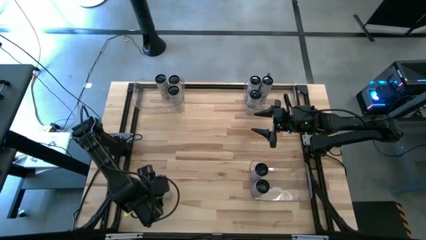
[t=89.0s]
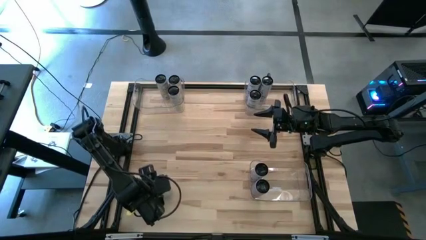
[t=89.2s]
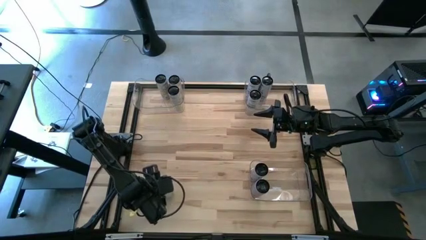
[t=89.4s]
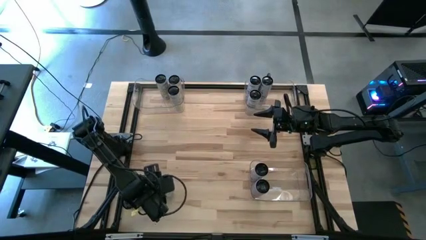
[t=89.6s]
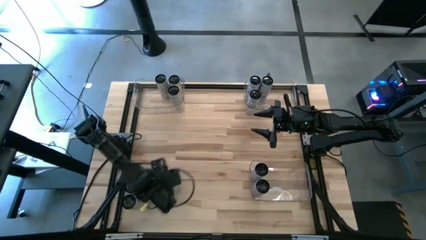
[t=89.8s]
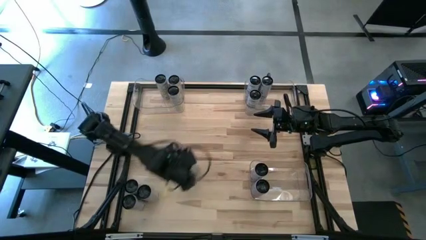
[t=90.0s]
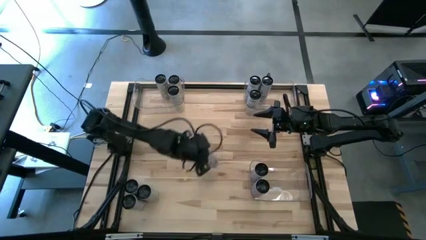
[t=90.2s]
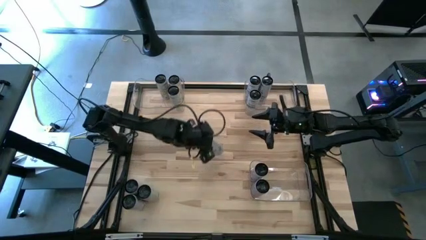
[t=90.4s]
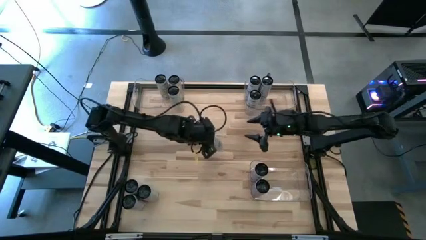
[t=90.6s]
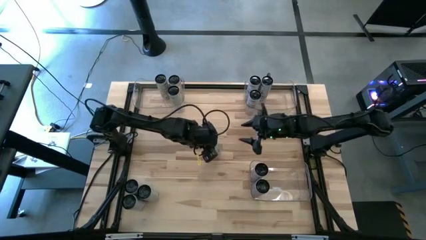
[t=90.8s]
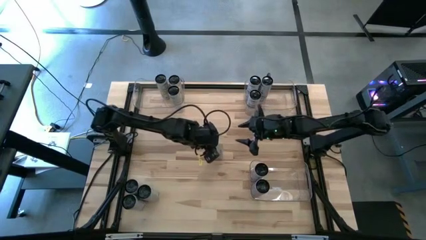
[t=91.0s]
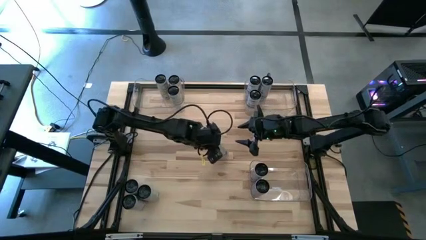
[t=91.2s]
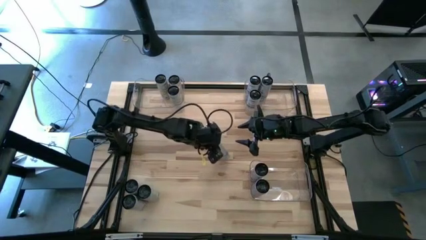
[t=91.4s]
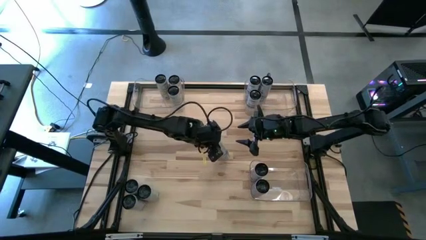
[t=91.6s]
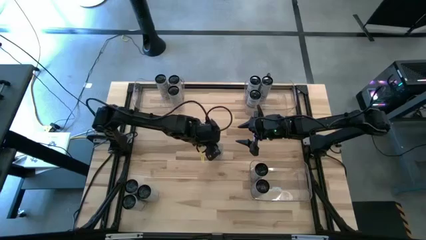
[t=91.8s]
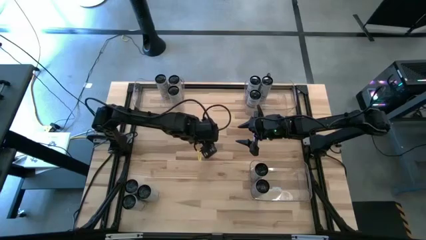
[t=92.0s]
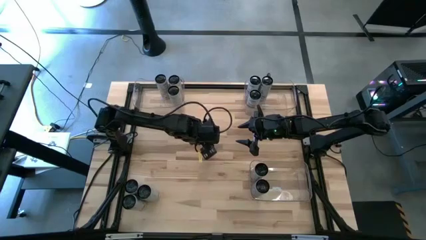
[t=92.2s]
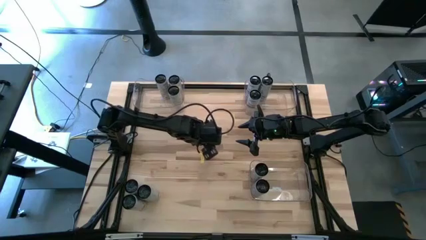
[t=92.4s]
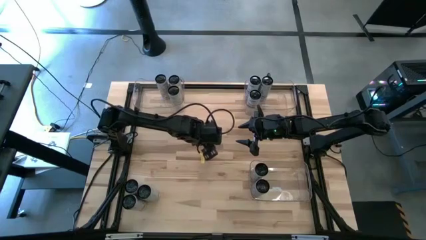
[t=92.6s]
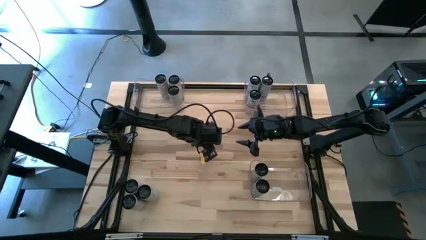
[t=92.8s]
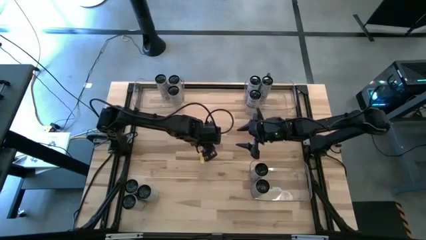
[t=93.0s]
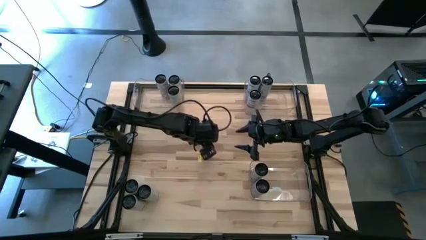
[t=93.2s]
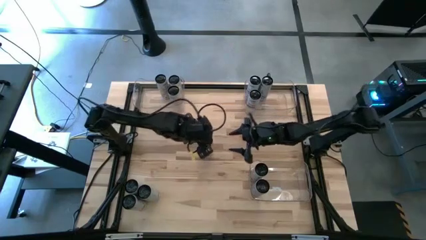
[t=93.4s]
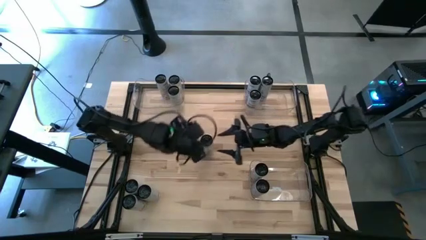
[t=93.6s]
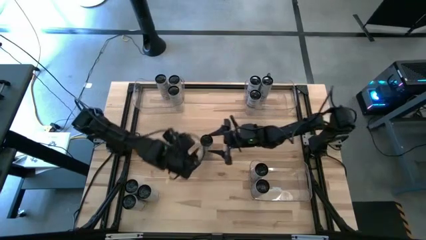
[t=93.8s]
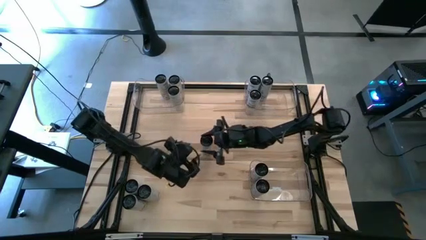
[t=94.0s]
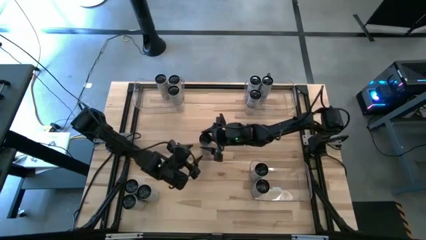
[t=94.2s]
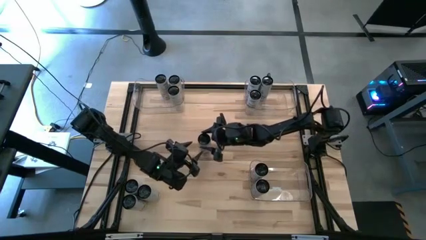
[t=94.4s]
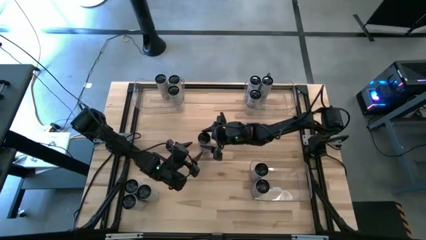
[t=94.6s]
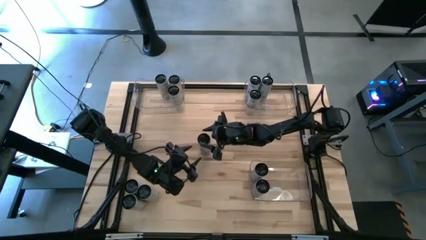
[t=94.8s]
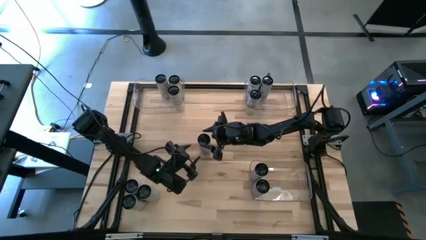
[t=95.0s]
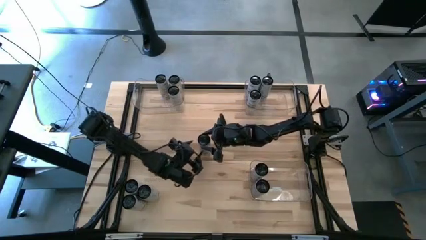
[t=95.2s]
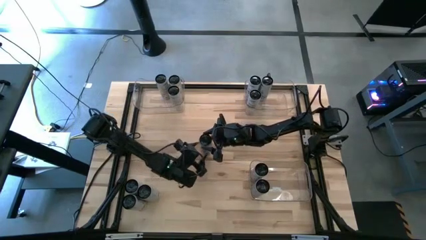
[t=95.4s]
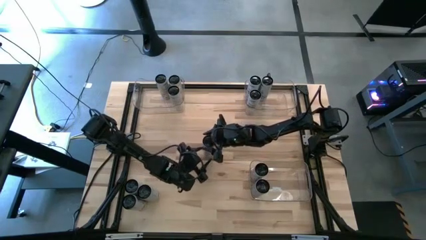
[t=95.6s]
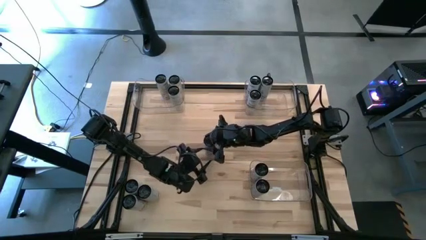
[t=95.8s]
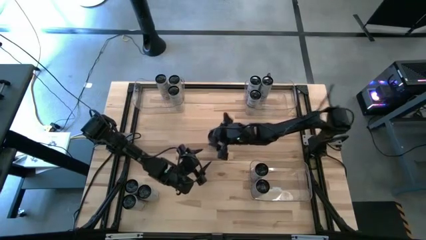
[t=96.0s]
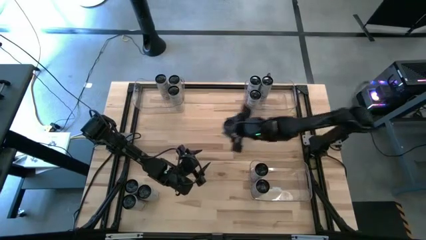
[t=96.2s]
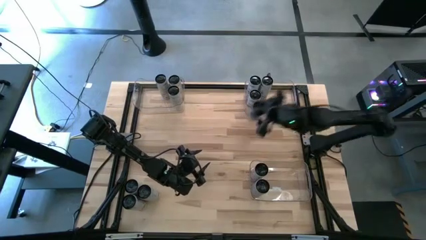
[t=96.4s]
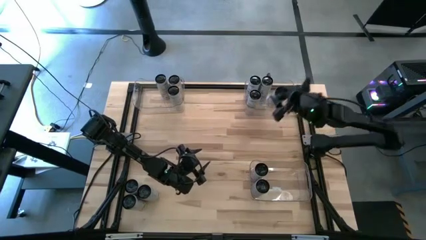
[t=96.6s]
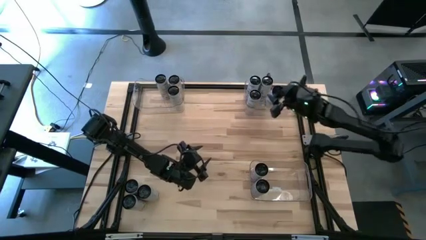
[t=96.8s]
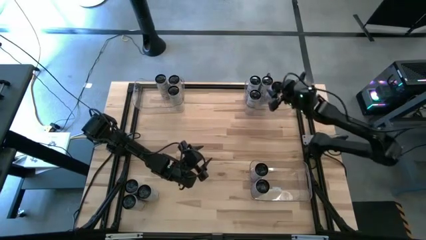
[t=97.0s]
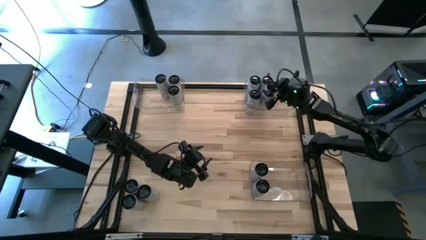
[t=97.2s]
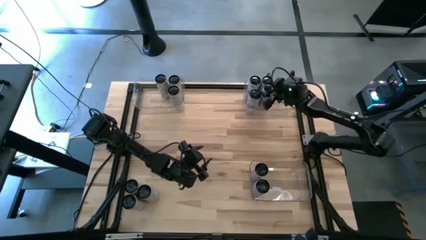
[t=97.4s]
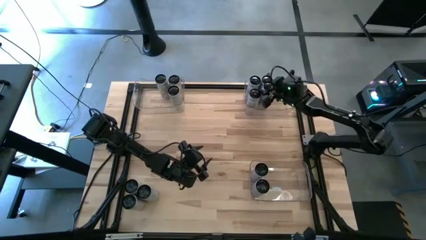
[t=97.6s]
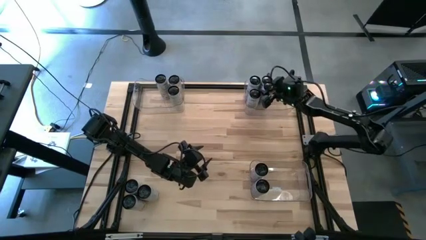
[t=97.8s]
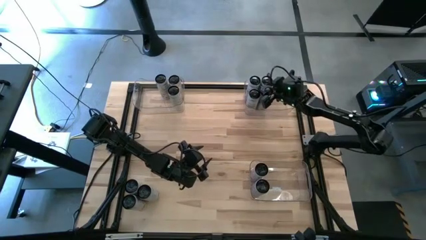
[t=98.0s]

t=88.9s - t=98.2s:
Task: Sort soda cans
Put the white-blue soda can into the top right transparent bin

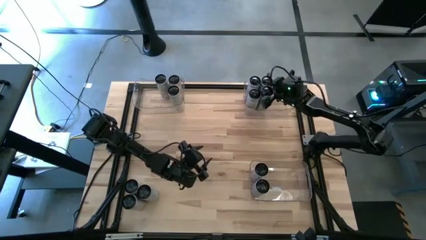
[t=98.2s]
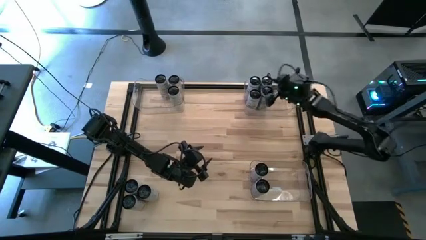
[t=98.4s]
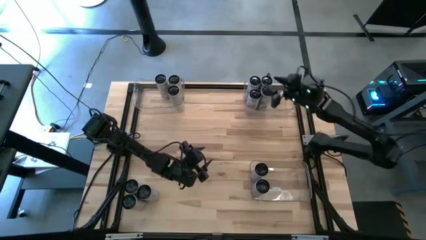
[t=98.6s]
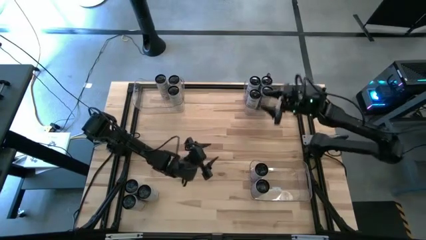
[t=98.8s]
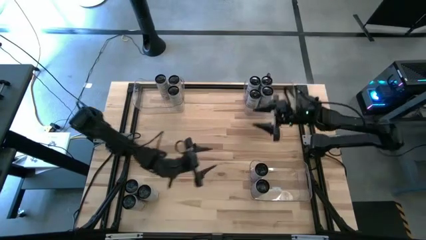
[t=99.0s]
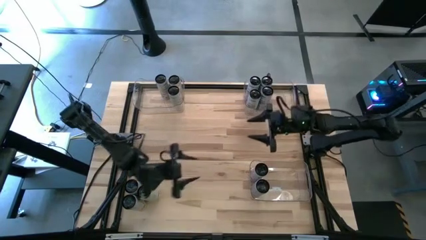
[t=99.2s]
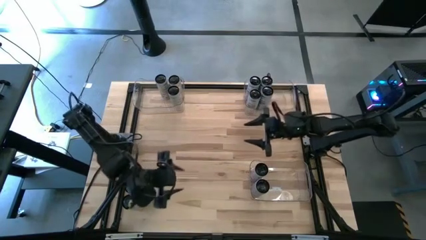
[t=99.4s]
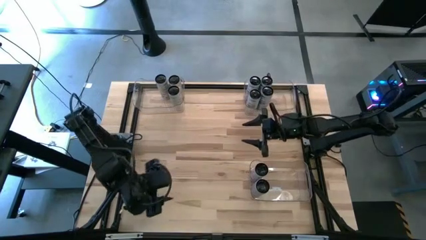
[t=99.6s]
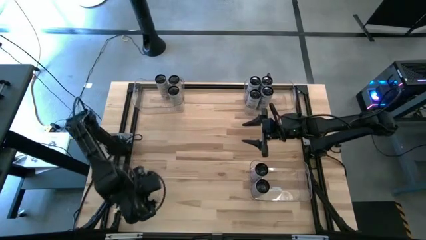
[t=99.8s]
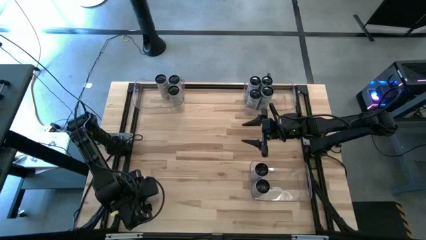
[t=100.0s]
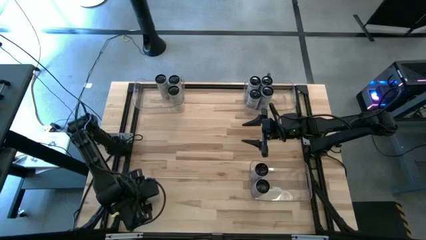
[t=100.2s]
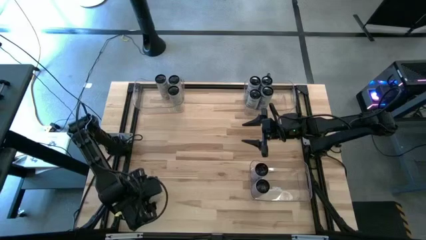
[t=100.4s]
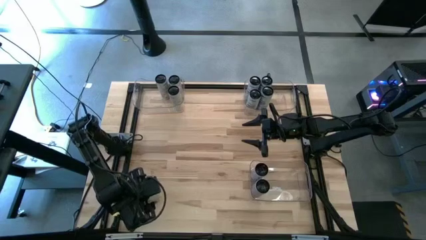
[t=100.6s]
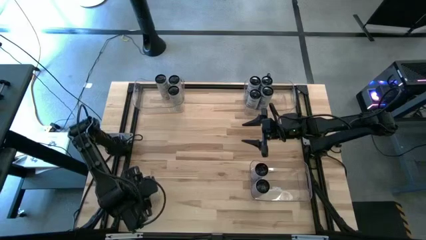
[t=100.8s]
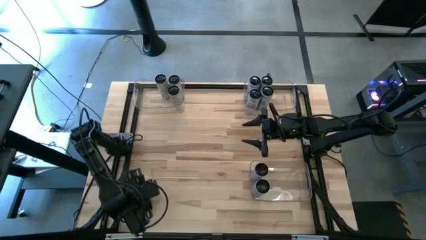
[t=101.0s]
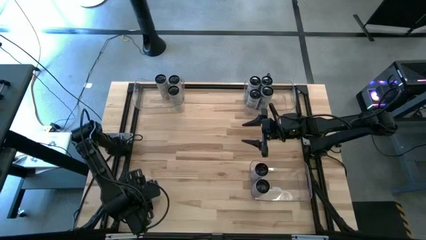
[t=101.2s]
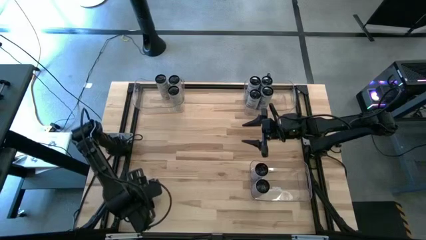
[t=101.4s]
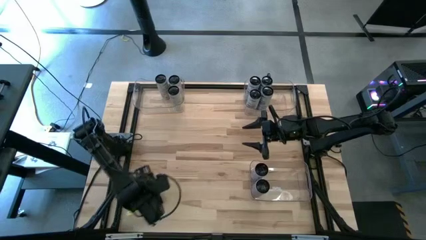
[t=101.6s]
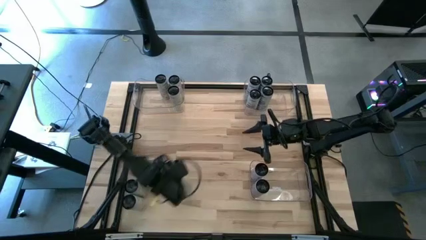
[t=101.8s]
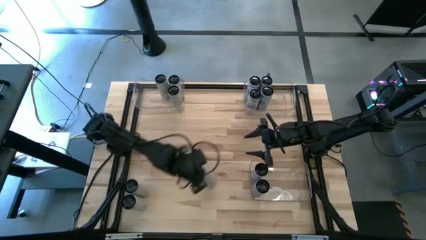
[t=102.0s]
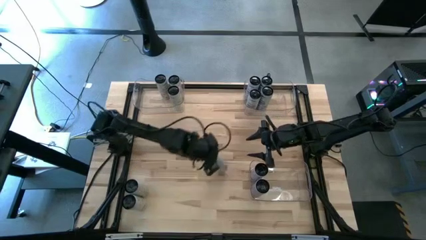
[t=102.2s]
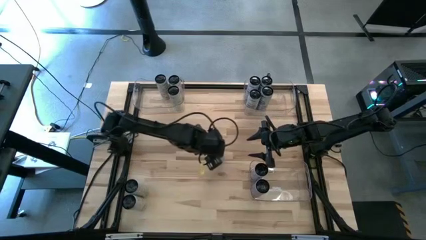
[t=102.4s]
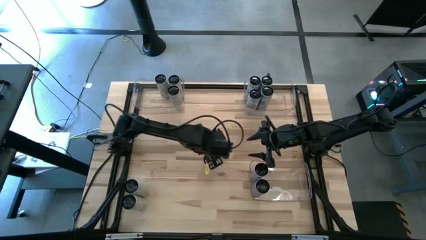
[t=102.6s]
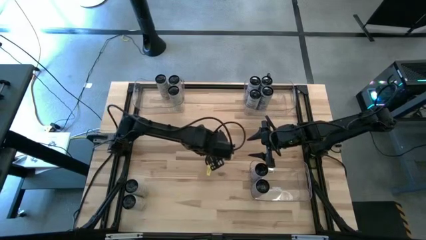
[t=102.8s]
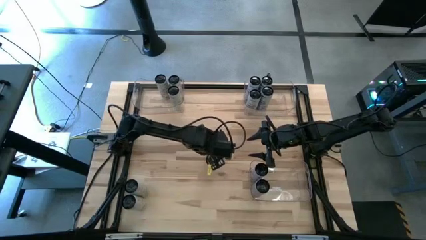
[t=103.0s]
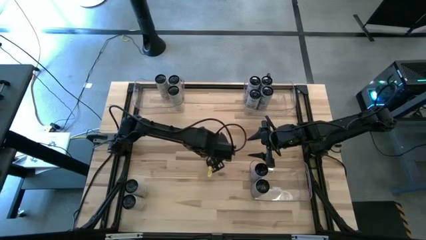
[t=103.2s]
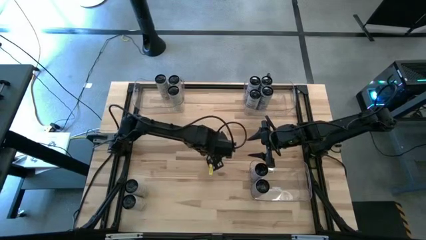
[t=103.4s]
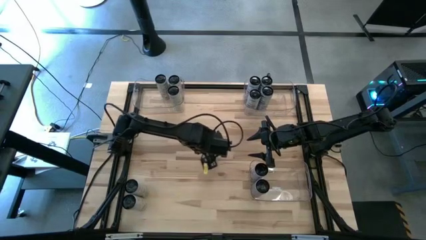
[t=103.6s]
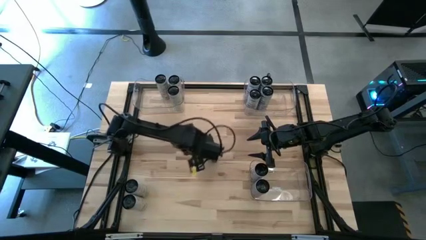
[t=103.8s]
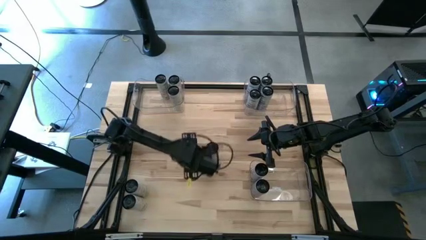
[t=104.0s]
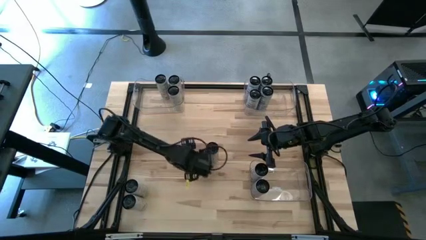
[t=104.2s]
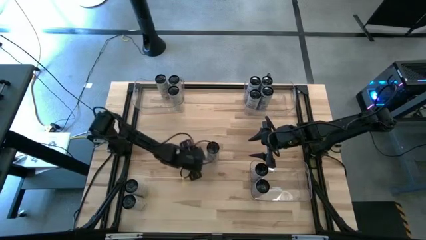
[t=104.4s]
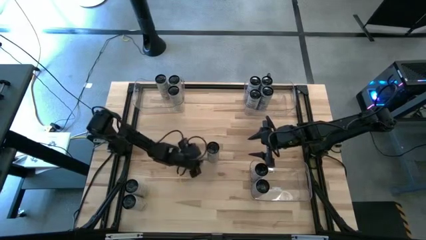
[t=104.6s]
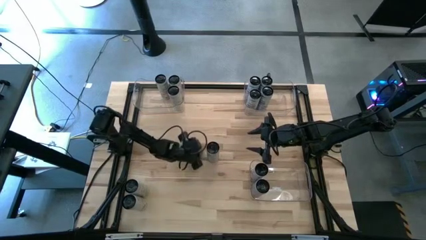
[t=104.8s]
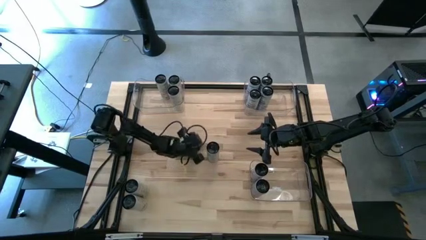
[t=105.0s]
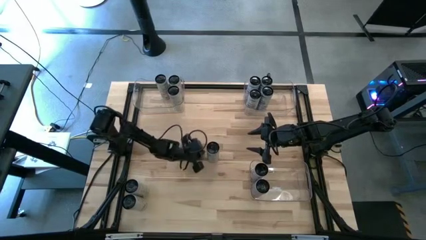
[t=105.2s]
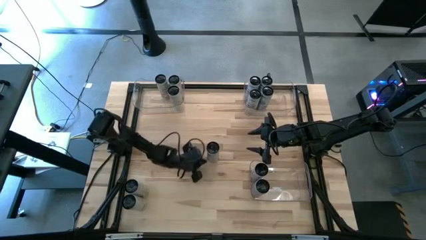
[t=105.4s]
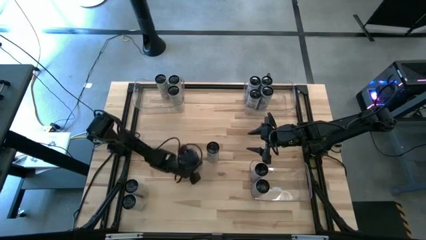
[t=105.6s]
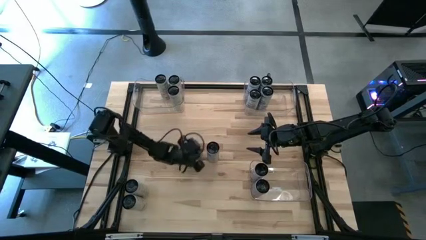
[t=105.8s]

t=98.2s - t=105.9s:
Put the white-pink soda can into the bottom right transparent bin
